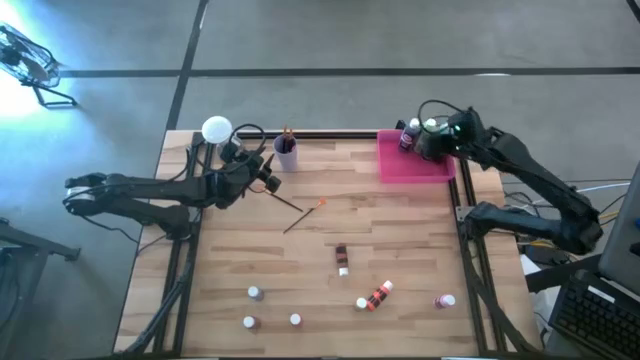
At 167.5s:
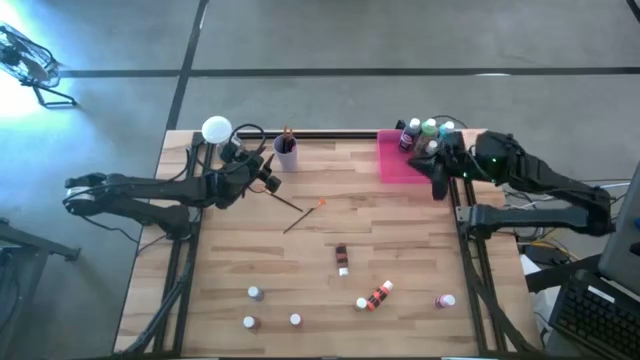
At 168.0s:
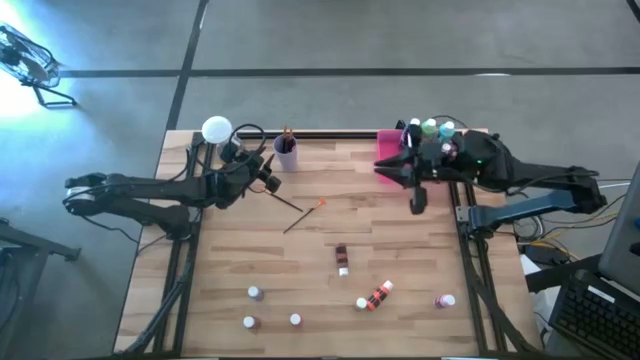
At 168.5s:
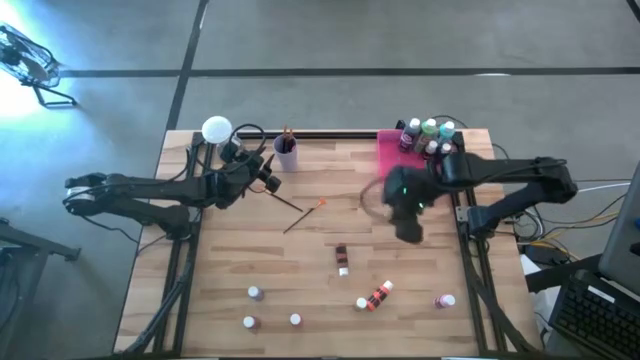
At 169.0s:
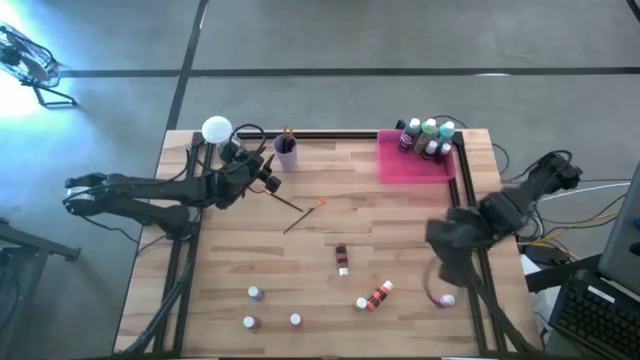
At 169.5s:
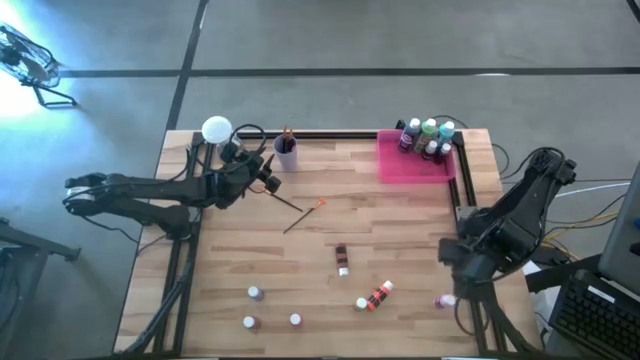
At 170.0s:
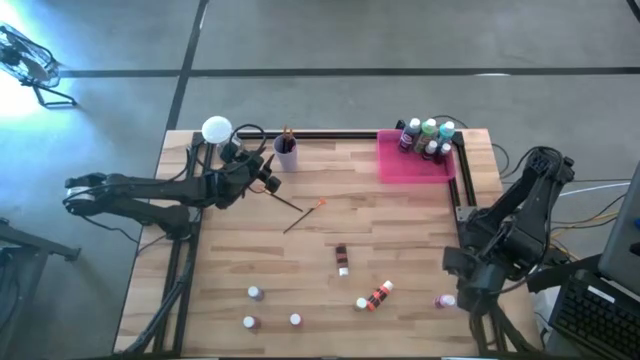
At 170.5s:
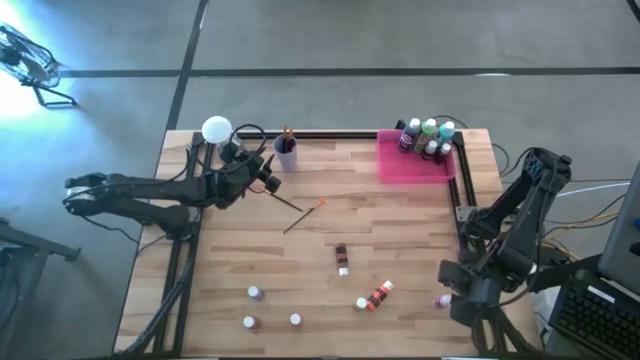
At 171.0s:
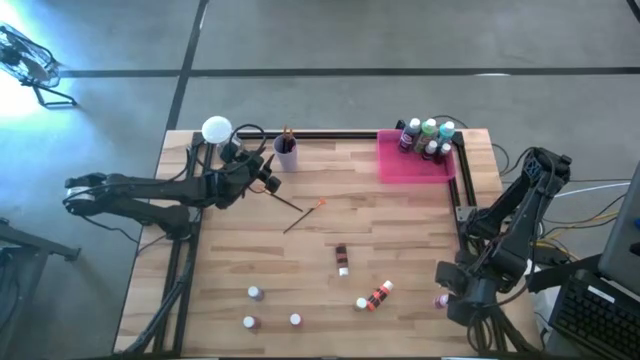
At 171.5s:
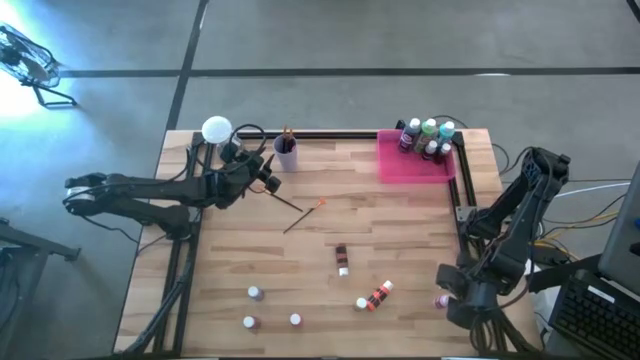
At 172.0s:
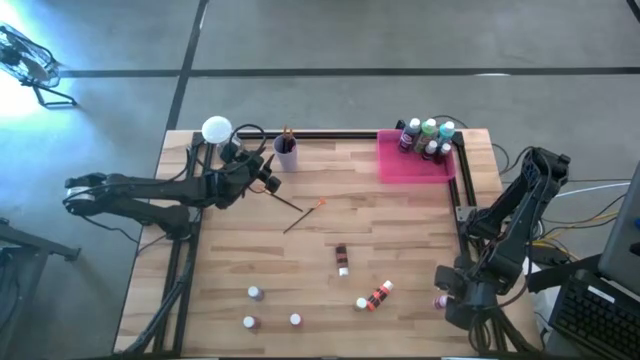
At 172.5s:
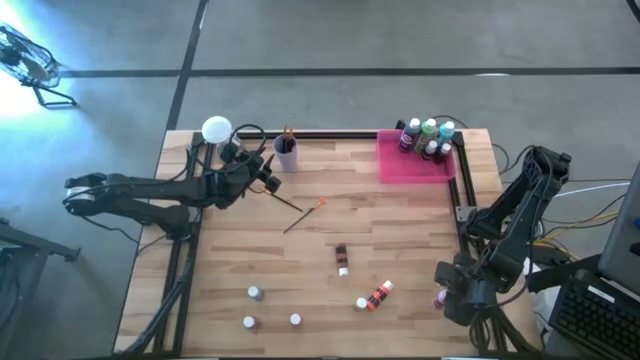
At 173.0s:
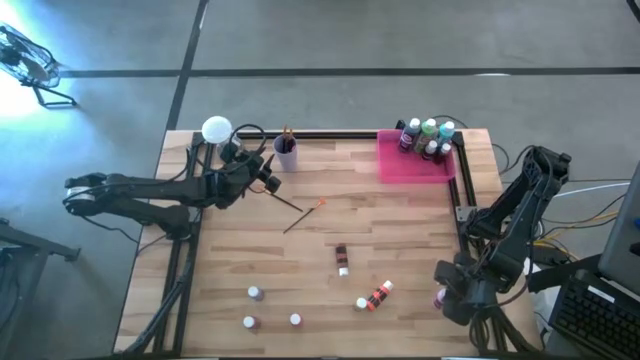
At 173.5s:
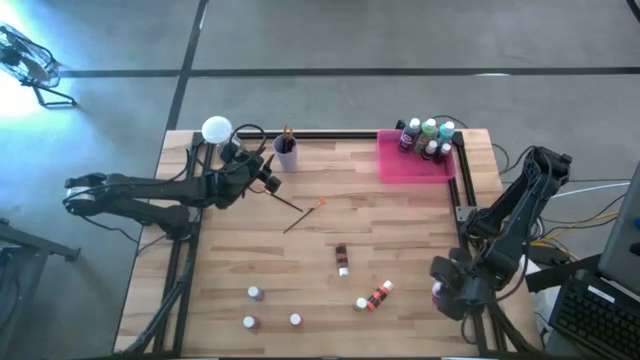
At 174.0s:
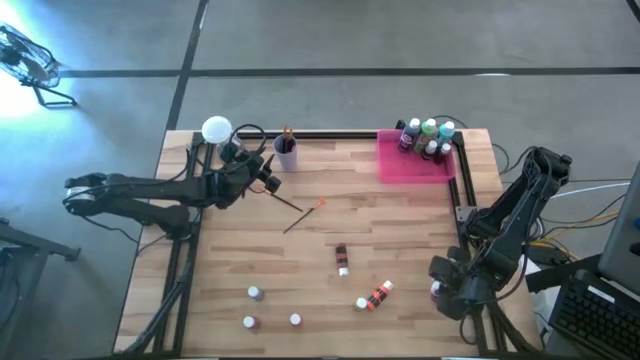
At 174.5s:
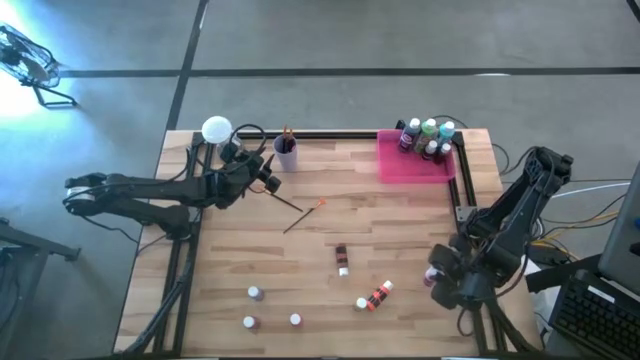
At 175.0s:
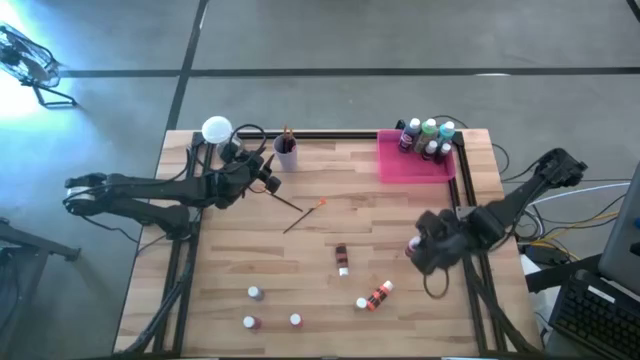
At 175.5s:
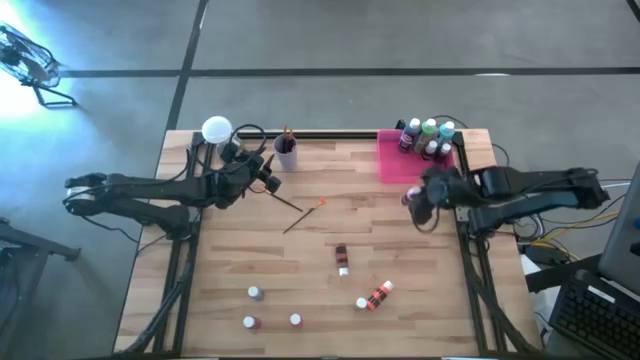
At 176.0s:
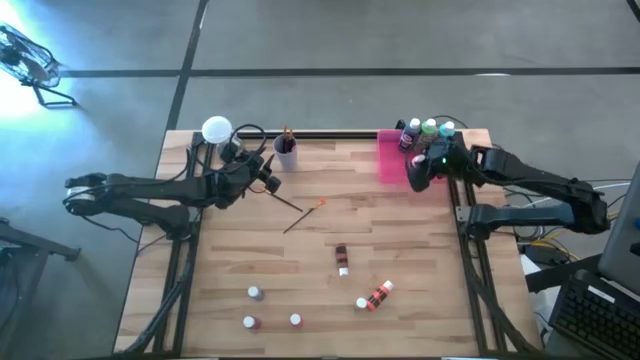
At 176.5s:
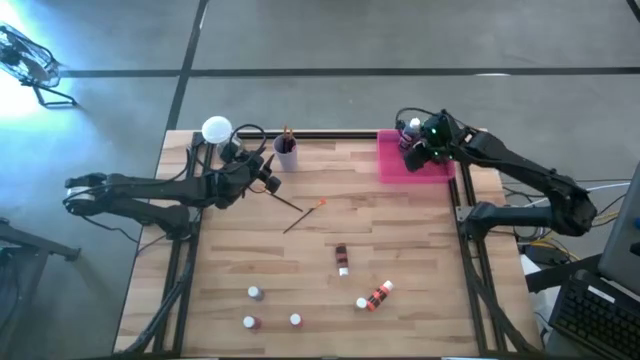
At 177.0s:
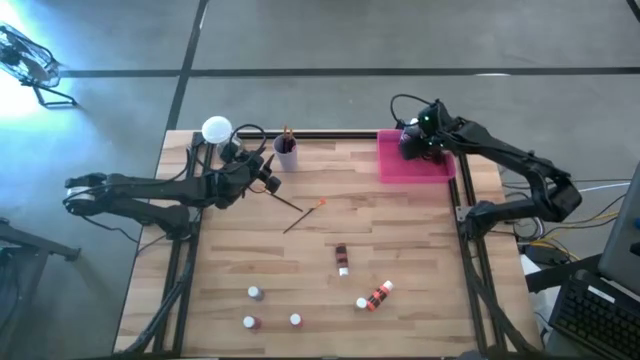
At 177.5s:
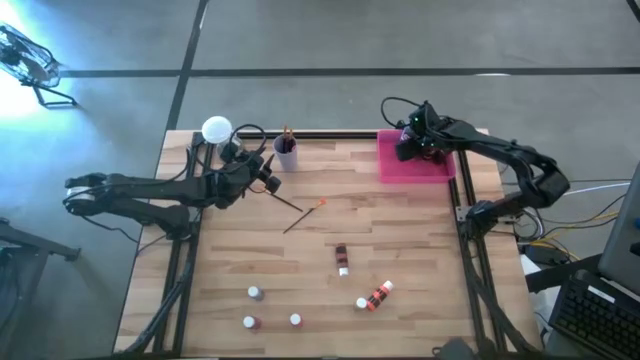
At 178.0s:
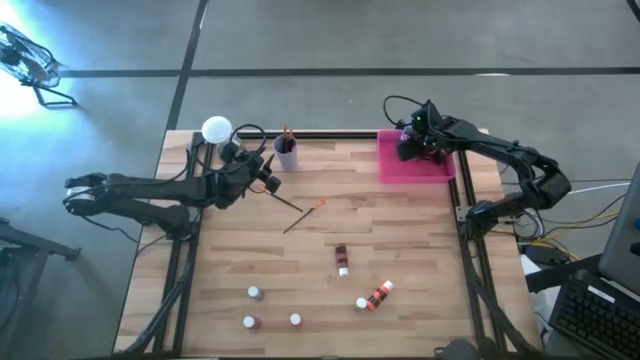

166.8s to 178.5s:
Task: Pick & Place Paint Supplies
Put the small pink paint bottle into the pink bin

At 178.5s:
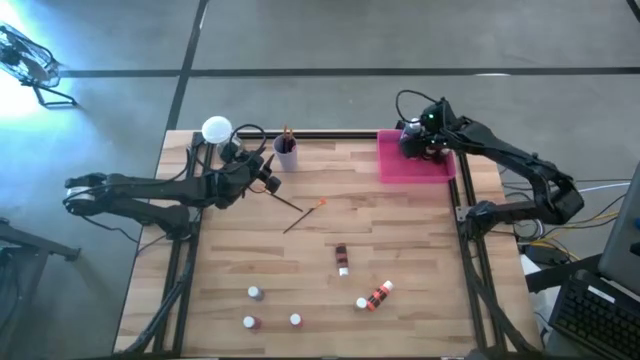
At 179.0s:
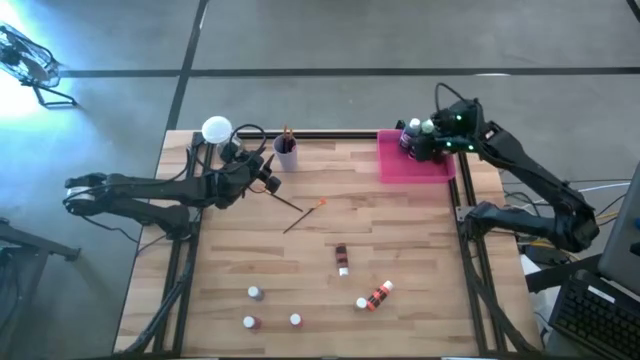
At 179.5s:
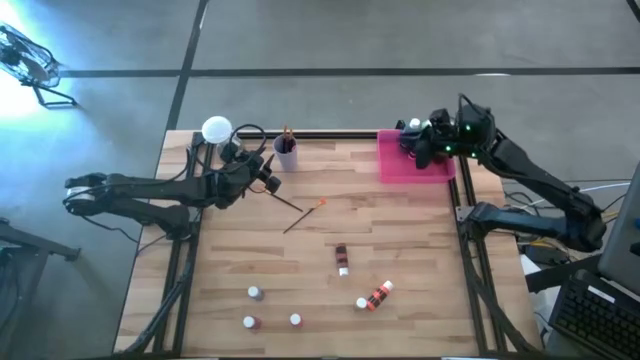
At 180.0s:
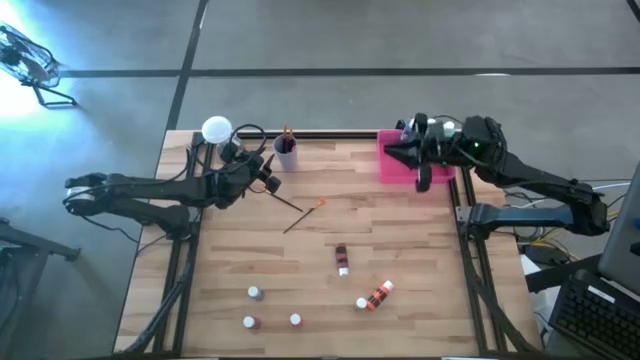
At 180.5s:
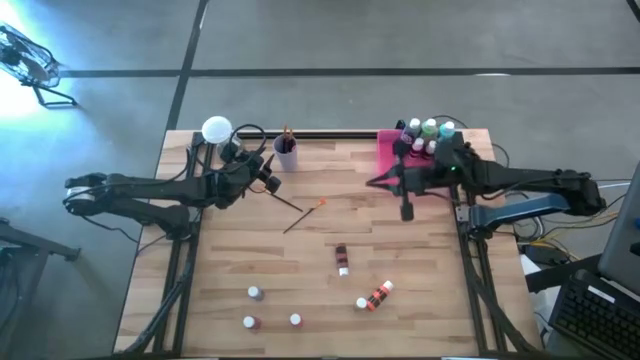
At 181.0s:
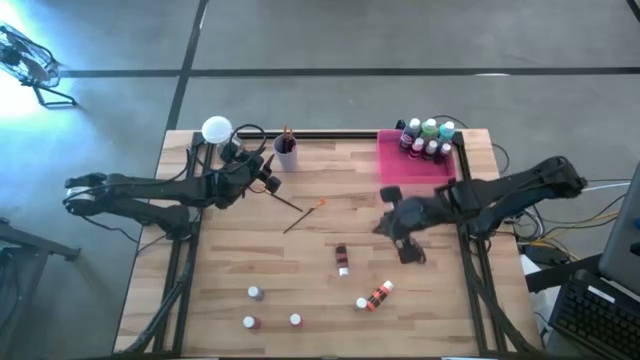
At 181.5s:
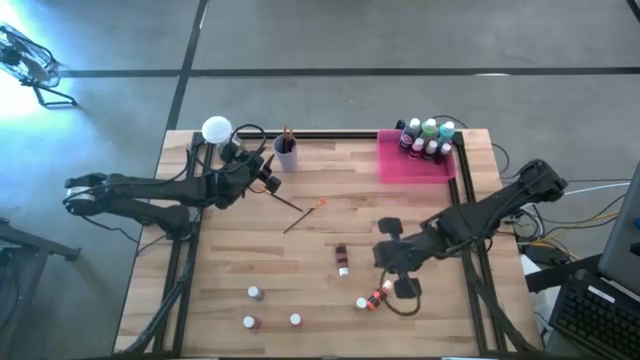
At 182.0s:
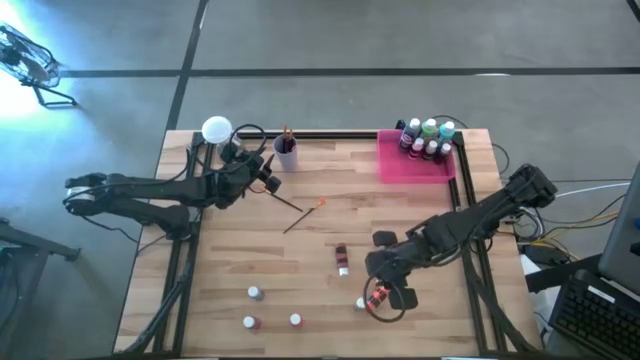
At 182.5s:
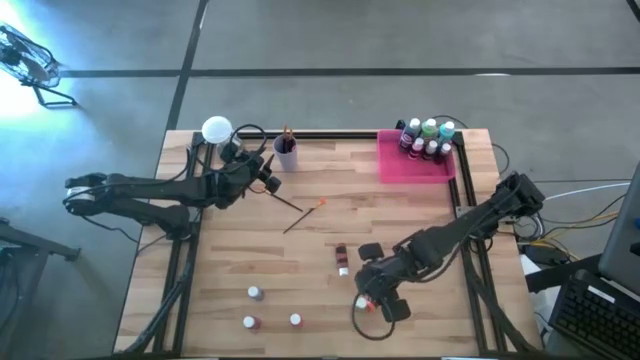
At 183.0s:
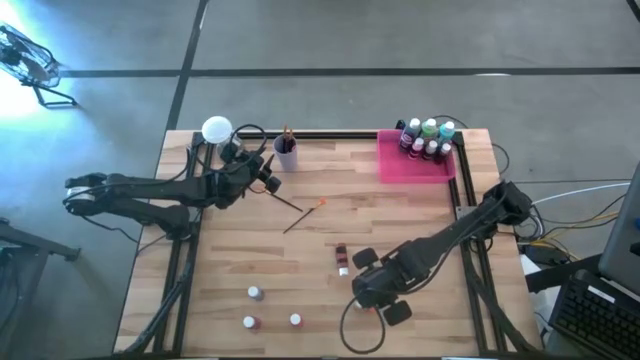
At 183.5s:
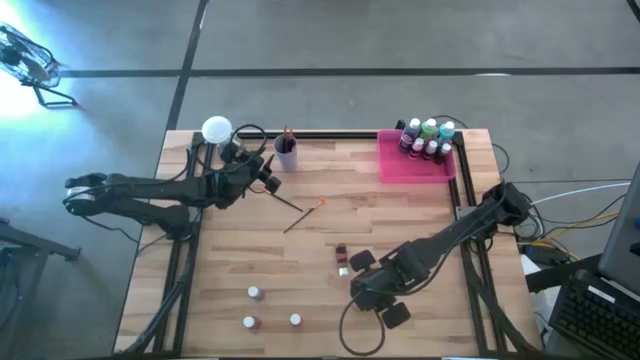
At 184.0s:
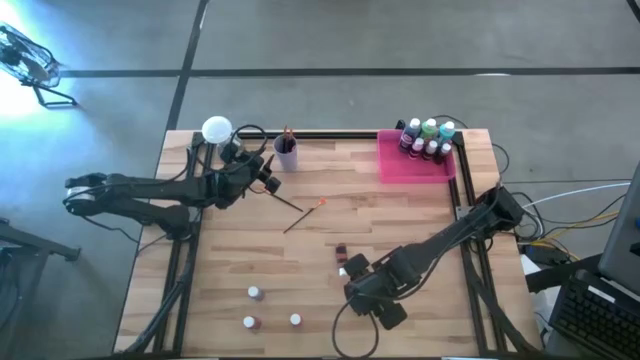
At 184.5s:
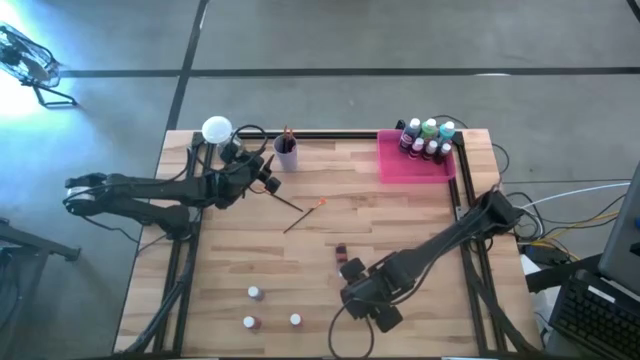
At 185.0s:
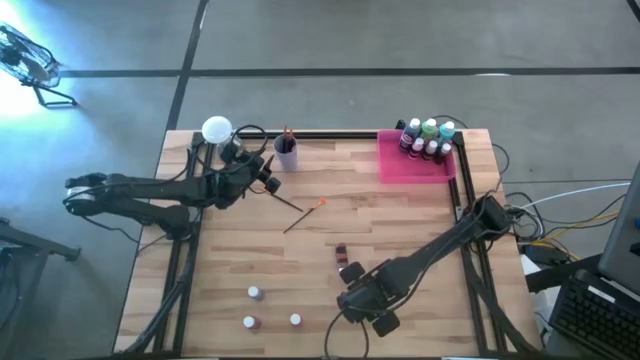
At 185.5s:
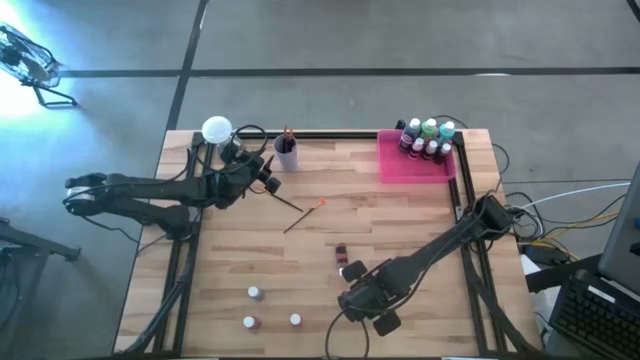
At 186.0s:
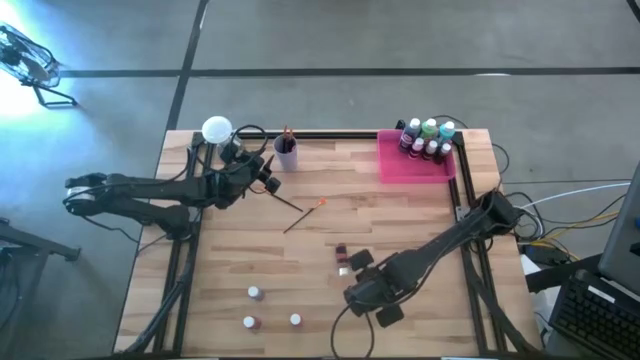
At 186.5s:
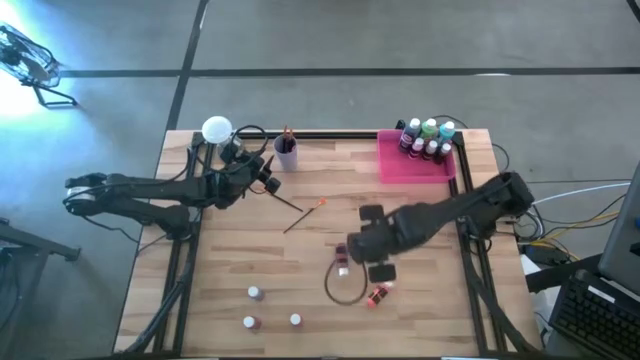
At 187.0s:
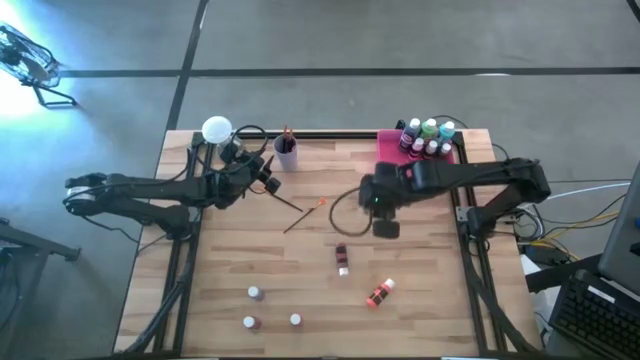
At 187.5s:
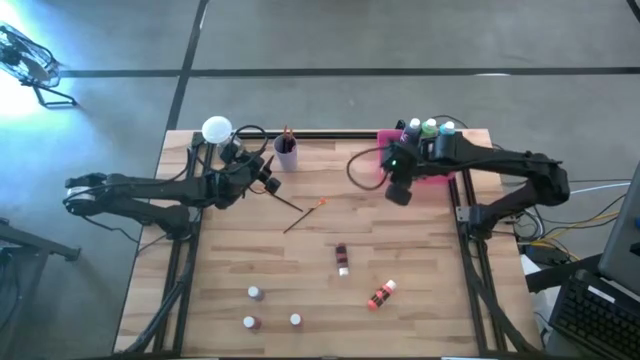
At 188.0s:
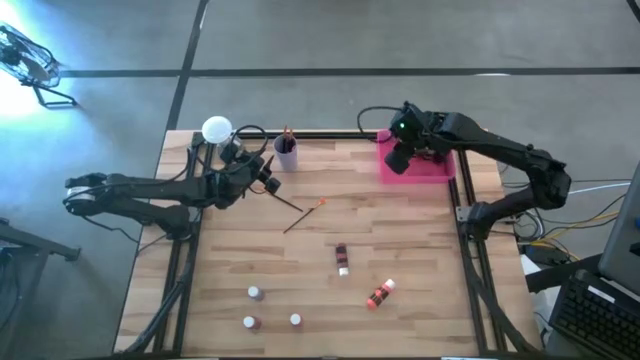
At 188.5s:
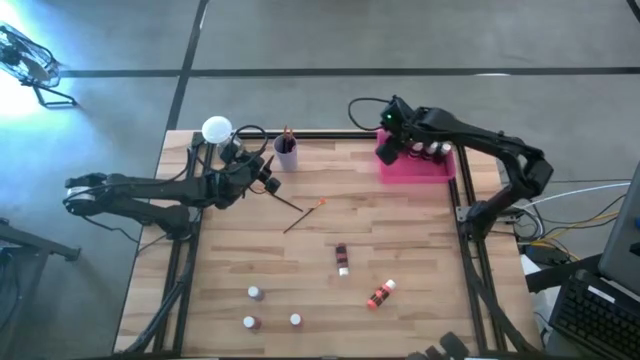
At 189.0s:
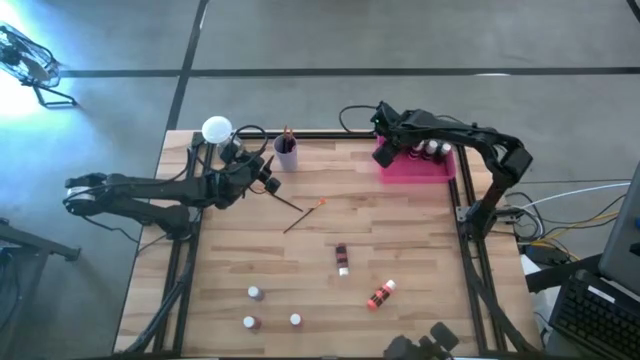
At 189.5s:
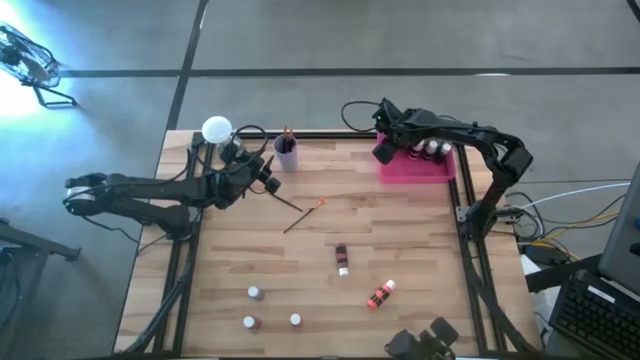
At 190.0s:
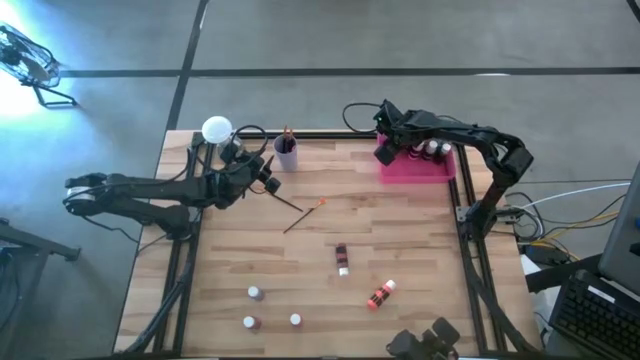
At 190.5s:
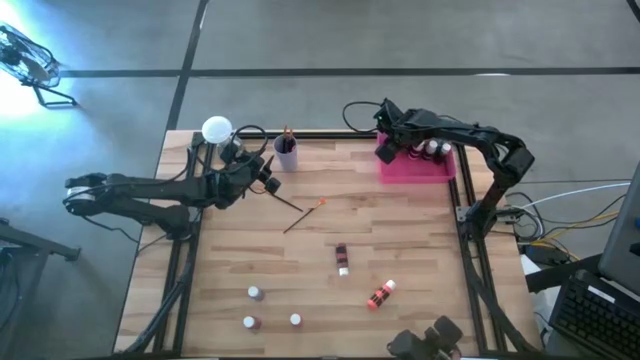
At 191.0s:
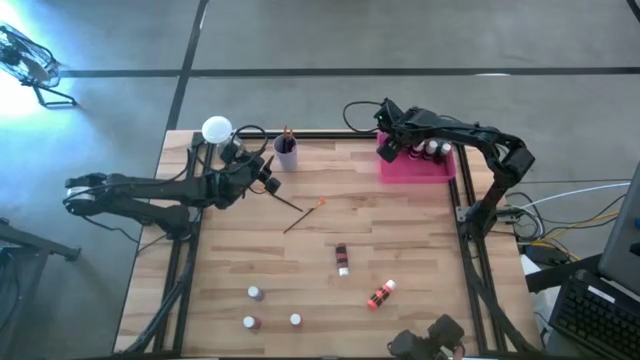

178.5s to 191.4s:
Put the small yellow paint bottle into the pink bin
